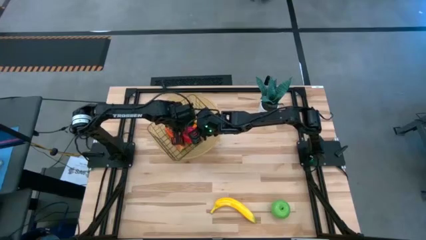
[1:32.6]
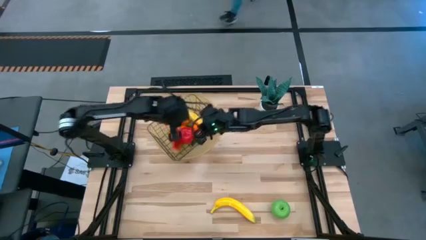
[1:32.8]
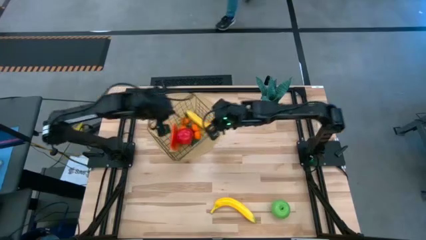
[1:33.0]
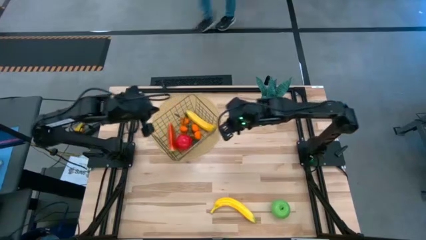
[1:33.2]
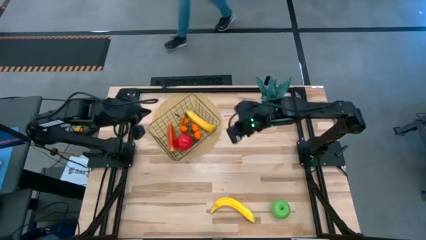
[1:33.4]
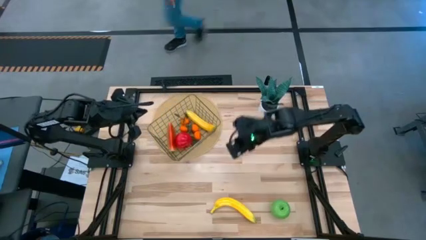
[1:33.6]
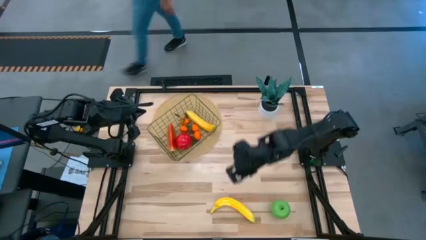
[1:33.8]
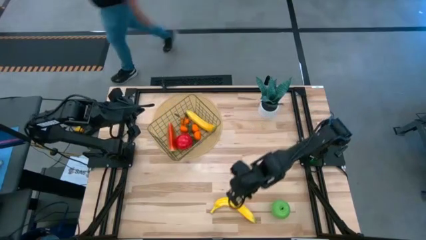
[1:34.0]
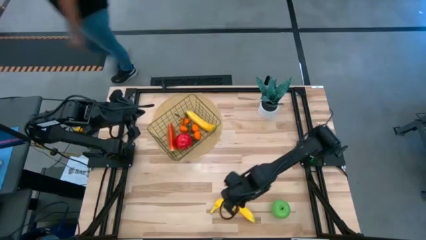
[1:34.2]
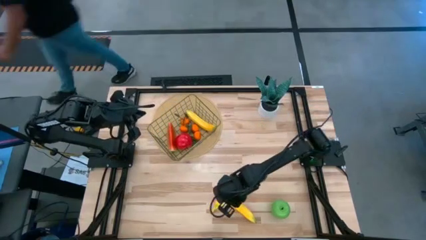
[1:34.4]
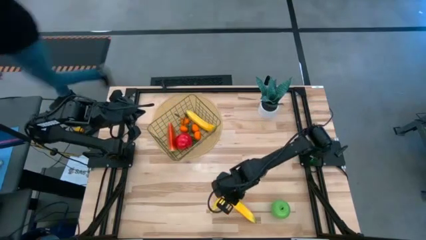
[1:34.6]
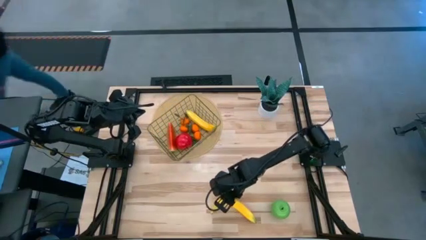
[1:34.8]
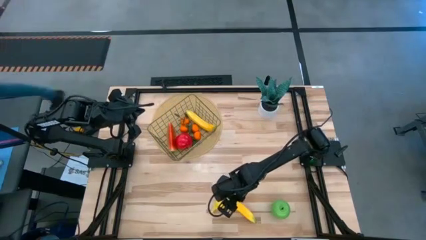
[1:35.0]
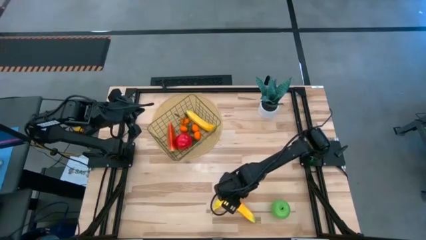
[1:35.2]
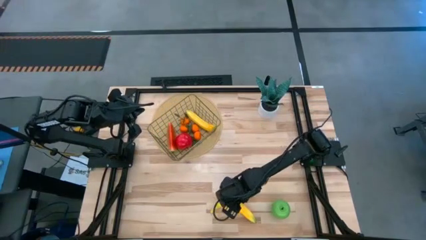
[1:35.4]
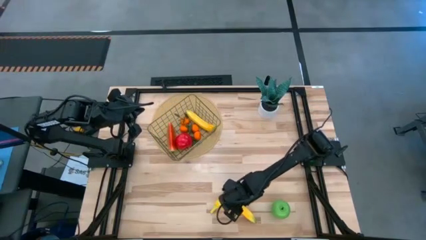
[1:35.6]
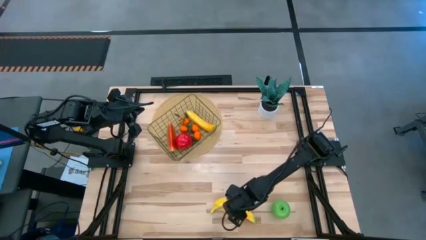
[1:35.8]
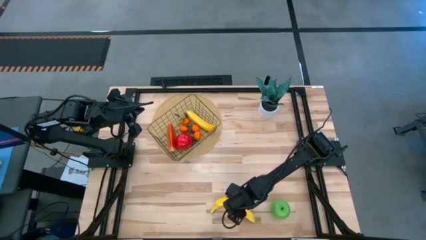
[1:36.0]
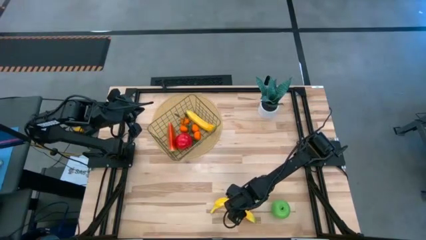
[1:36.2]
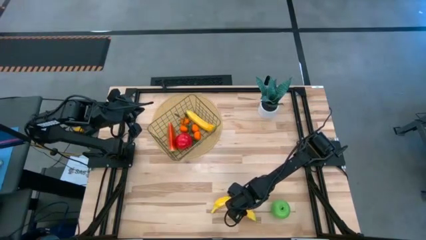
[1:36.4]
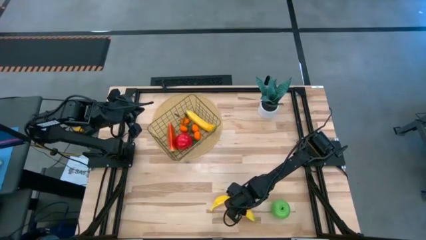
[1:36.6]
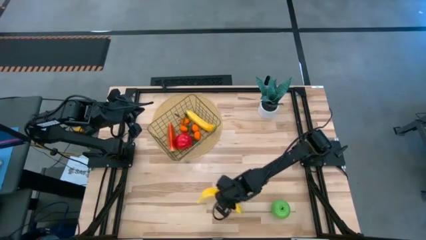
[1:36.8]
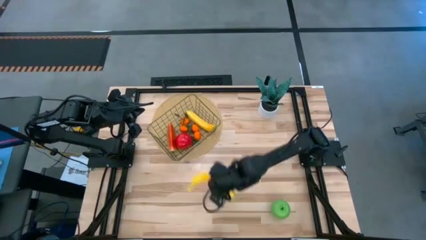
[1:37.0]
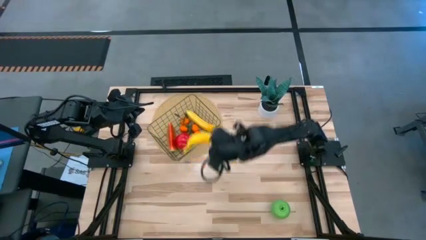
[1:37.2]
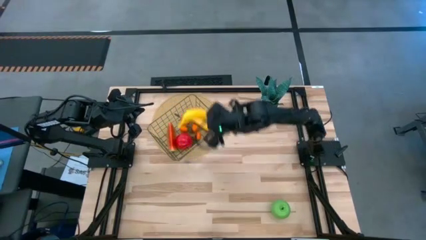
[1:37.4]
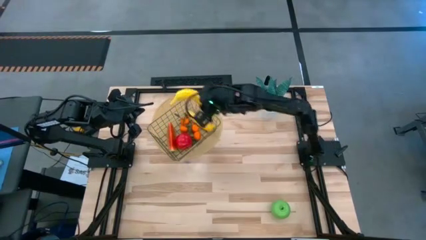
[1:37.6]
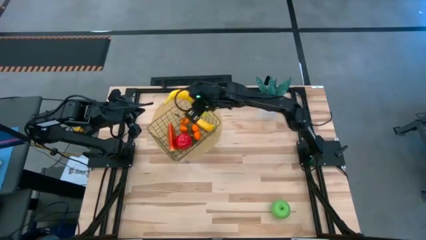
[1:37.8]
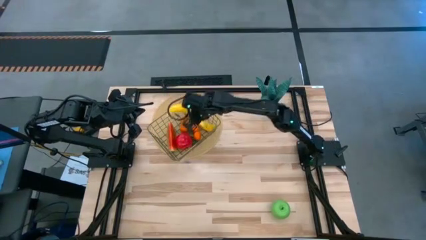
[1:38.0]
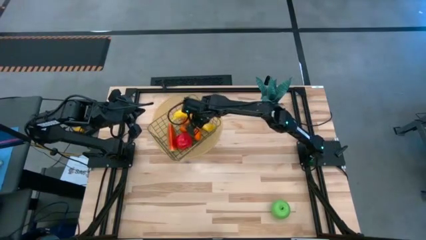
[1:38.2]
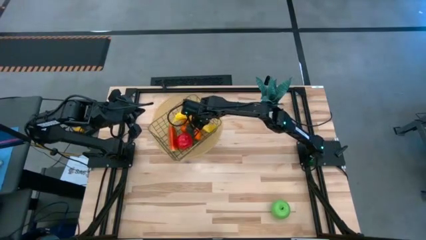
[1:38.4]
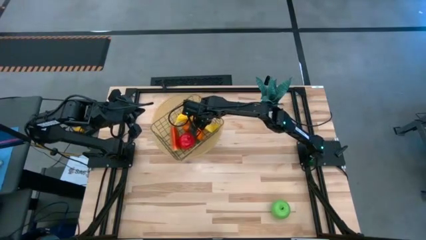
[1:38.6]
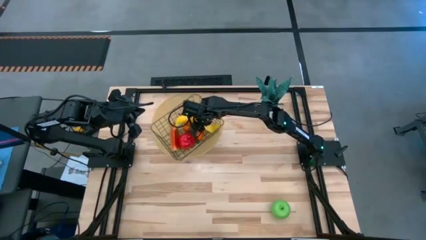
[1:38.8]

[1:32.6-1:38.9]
Task: Build produce basket
Put the yellow banana into the wire basket

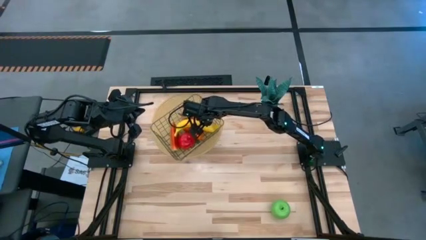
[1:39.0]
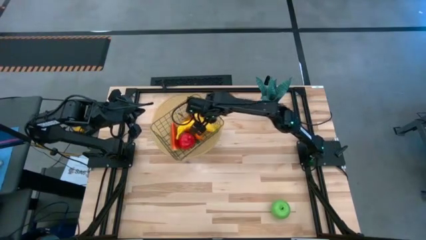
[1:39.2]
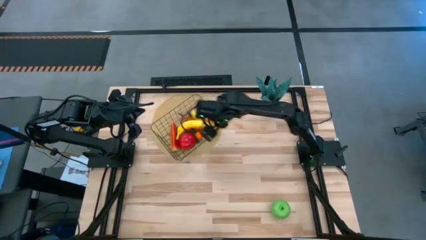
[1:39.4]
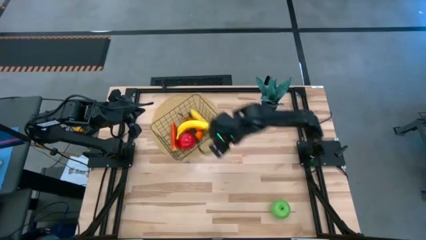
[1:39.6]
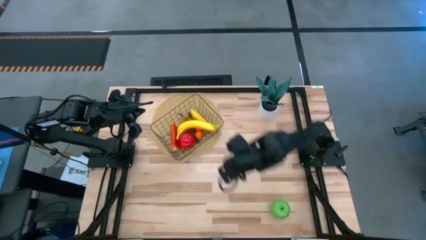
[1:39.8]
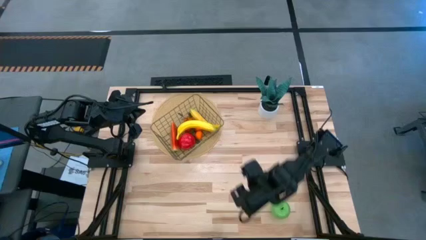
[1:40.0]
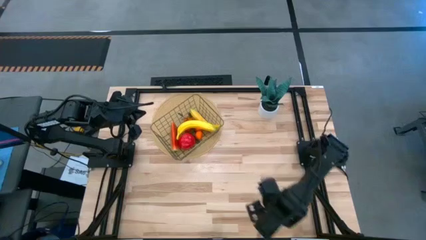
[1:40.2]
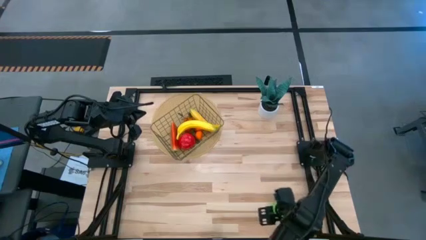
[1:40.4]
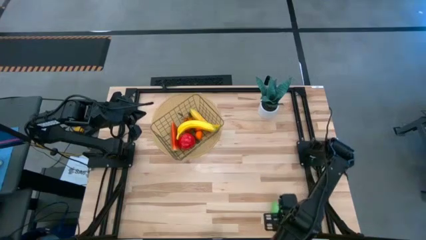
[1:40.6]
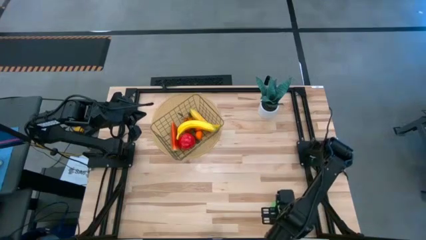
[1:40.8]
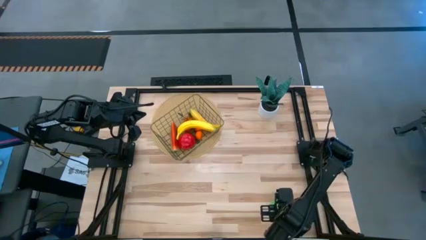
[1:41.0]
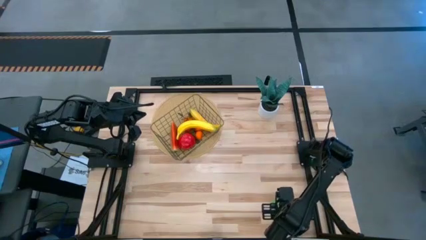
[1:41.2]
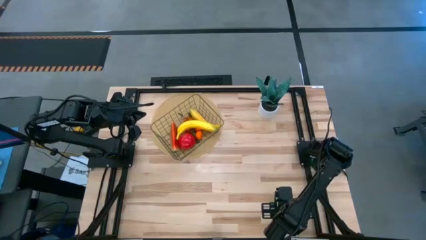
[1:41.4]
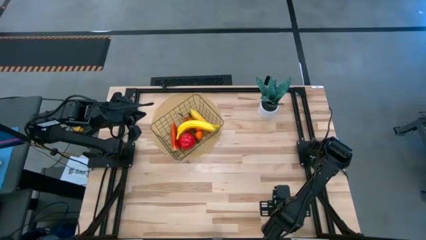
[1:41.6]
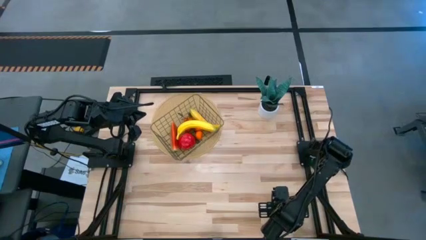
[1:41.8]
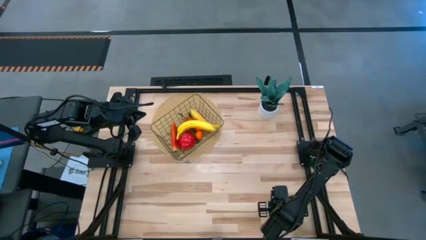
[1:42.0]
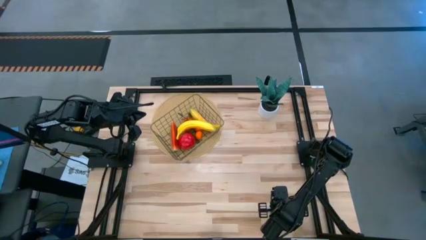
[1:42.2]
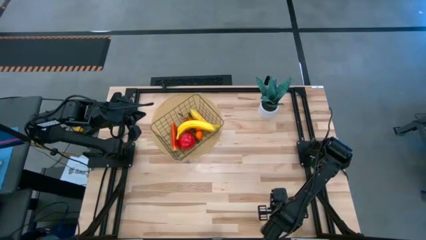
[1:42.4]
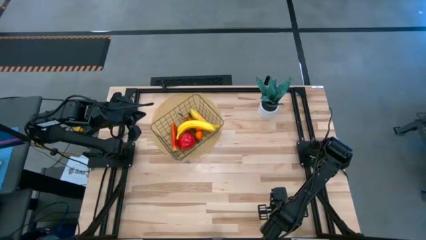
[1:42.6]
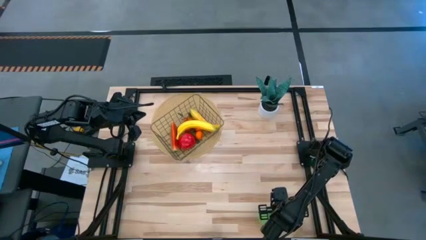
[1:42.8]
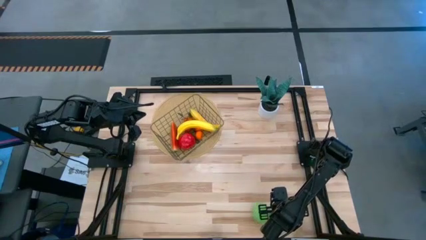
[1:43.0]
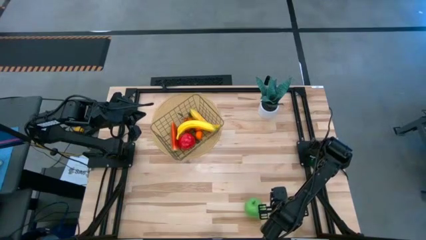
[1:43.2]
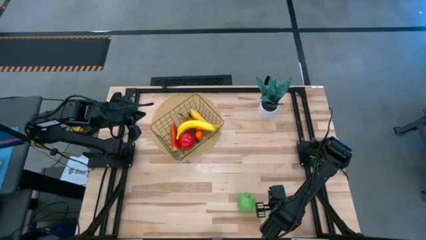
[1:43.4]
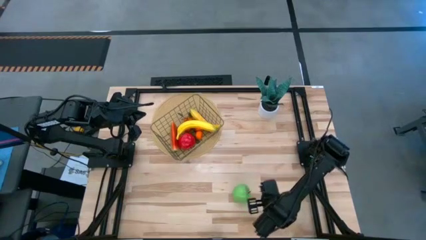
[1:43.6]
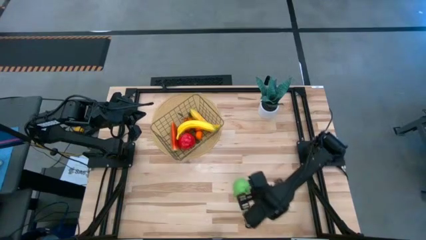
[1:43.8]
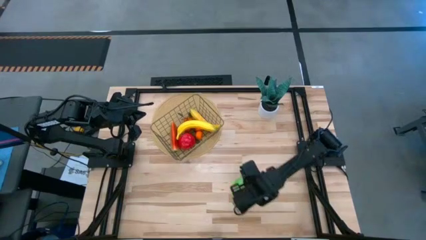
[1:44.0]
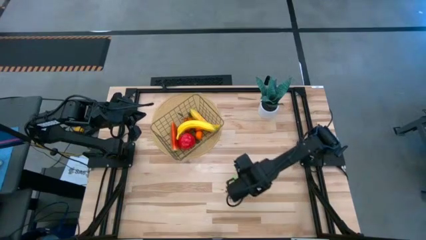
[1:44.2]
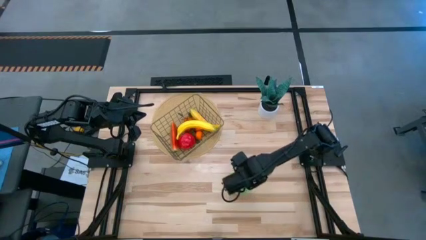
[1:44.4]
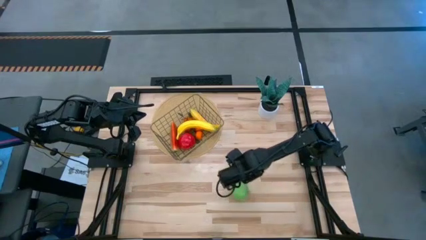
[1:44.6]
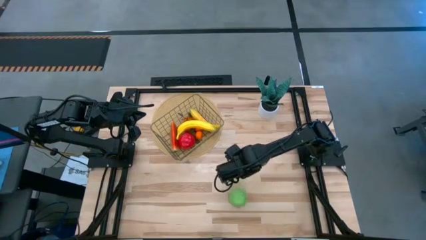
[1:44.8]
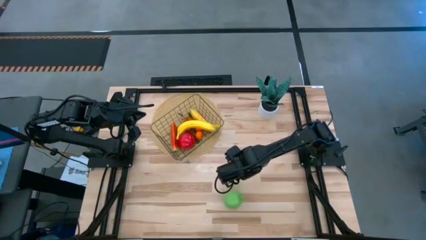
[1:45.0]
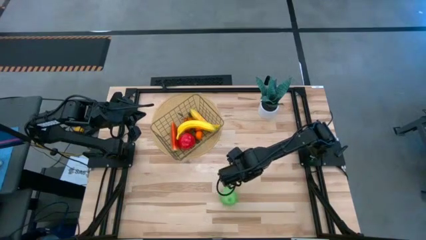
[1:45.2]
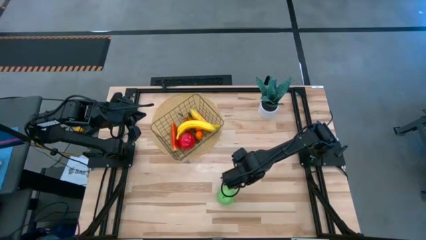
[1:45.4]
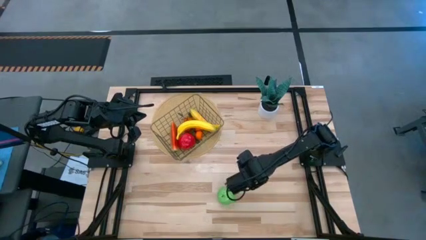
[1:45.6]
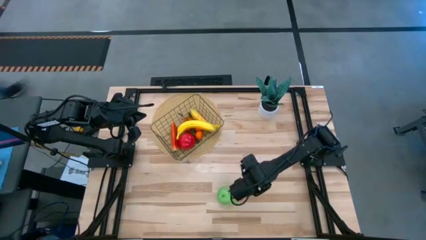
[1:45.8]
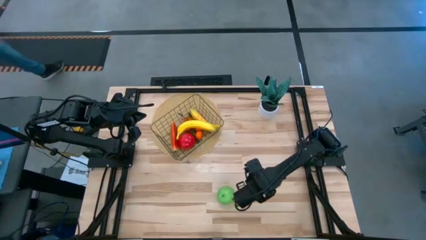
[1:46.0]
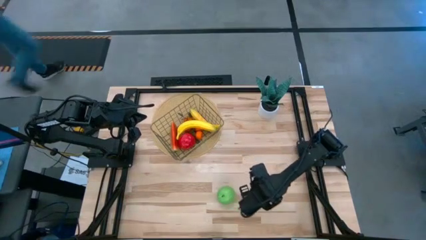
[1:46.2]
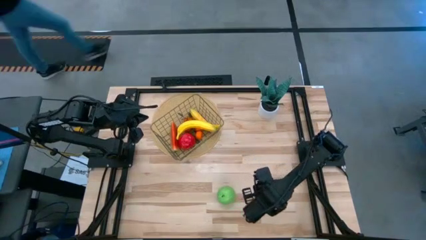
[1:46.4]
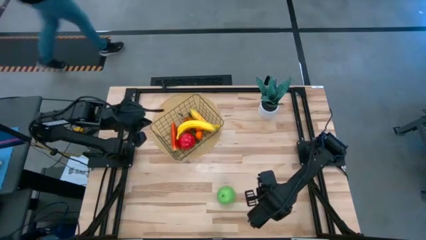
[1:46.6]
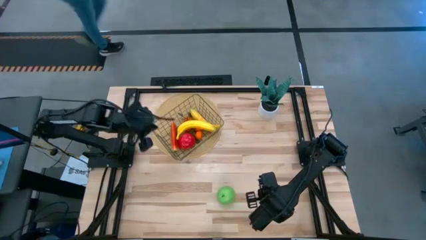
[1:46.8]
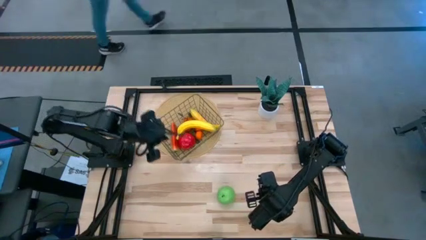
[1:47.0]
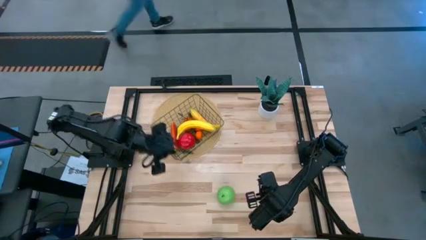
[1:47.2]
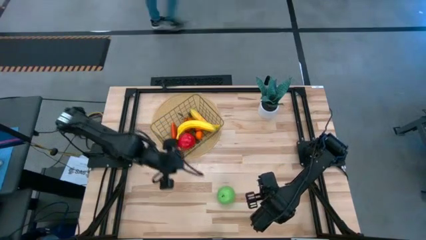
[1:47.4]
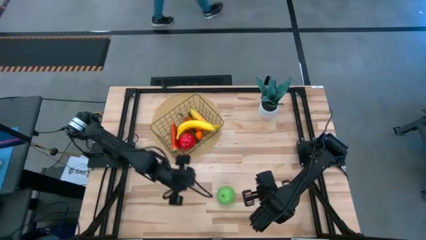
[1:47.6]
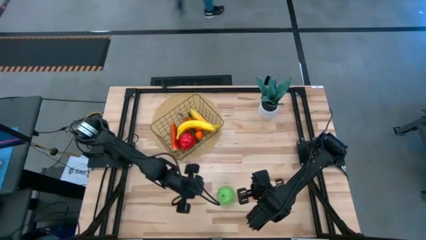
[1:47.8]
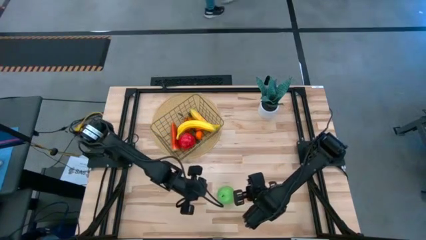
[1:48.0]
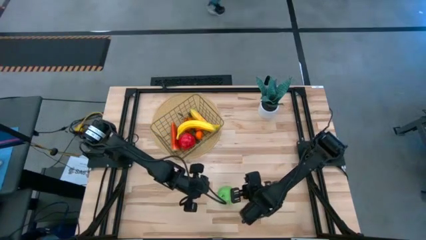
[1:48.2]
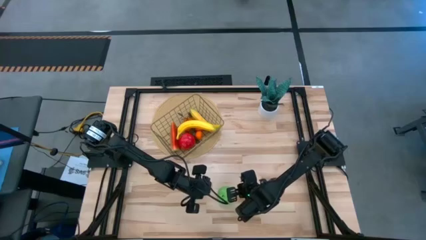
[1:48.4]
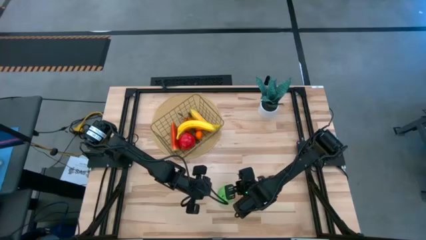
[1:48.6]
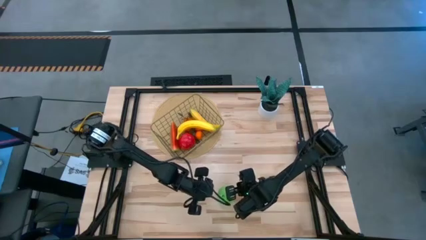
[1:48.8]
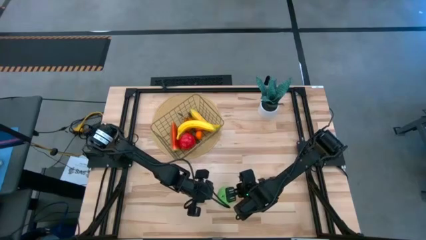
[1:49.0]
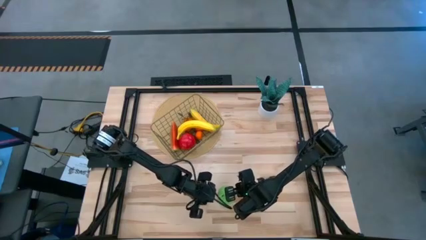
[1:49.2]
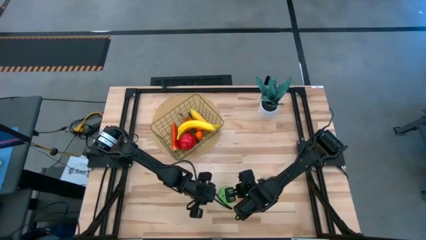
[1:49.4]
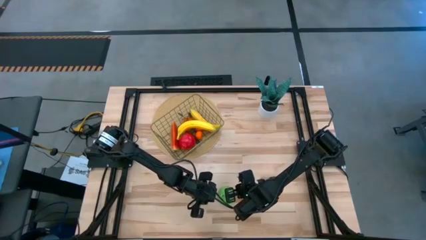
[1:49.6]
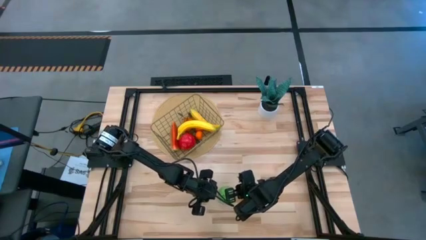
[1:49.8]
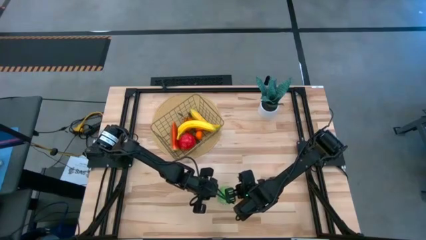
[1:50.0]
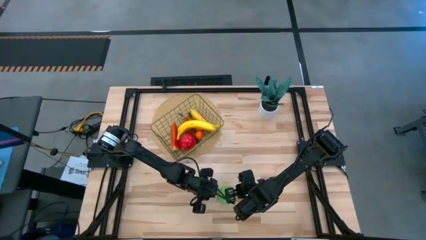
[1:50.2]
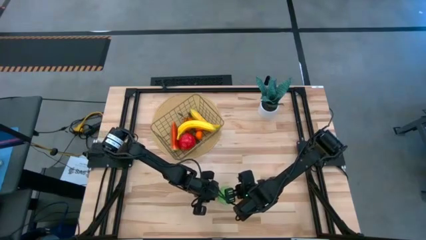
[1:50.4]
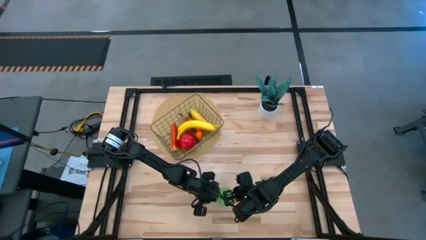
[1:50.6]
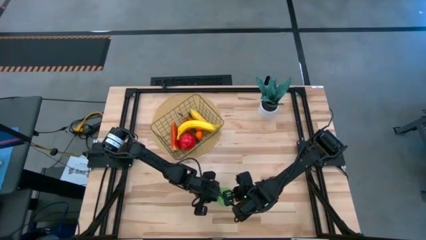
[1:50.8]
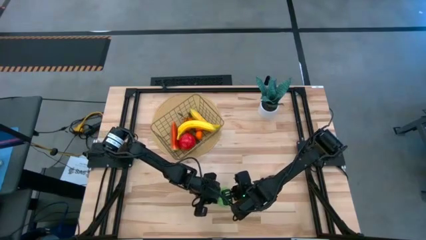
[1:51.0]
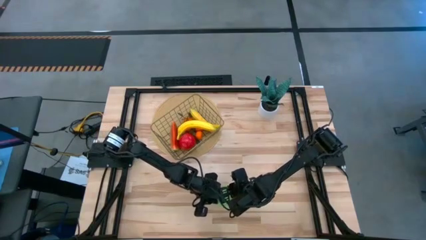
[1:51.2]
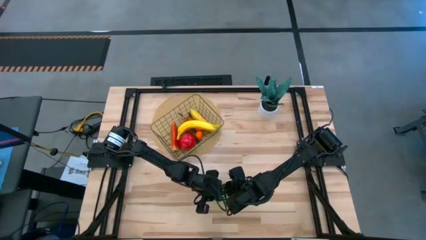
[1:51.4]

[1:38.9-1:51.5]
Put the green apple into the wire basket
